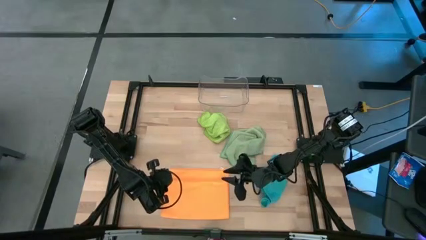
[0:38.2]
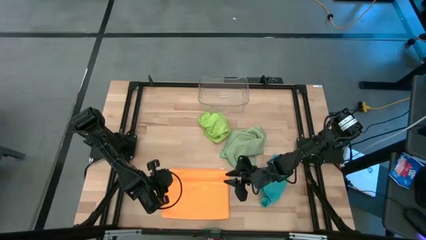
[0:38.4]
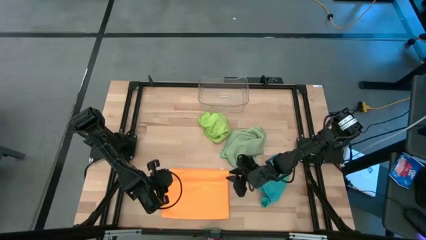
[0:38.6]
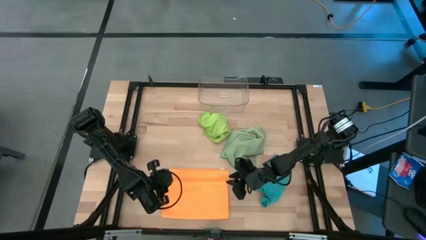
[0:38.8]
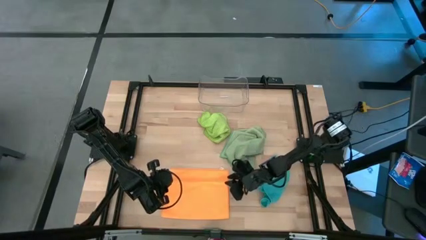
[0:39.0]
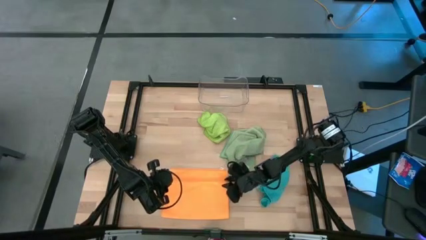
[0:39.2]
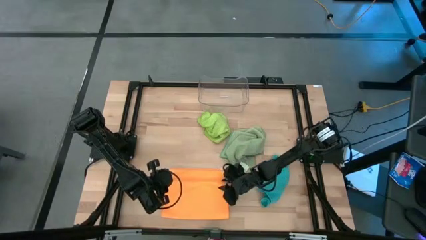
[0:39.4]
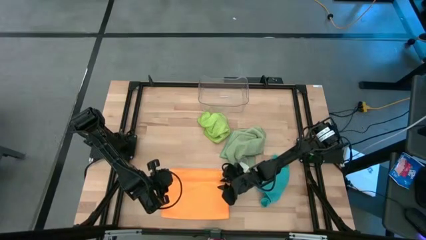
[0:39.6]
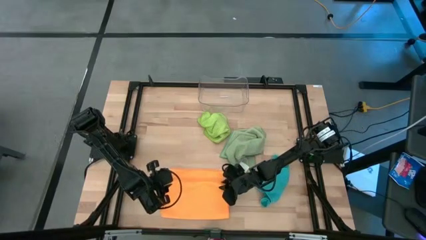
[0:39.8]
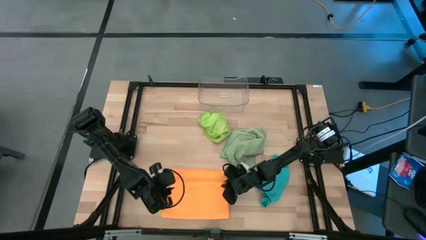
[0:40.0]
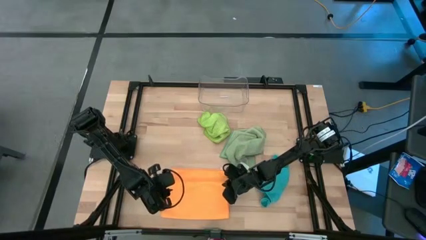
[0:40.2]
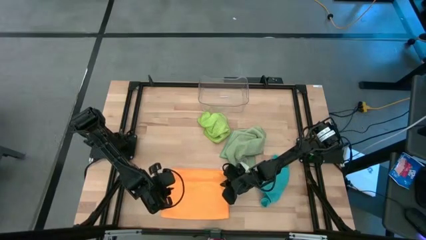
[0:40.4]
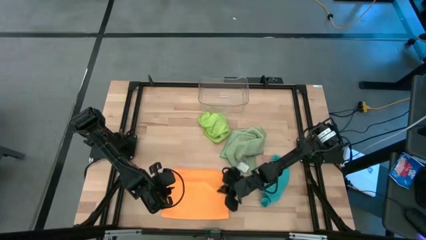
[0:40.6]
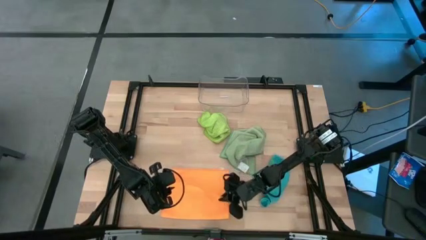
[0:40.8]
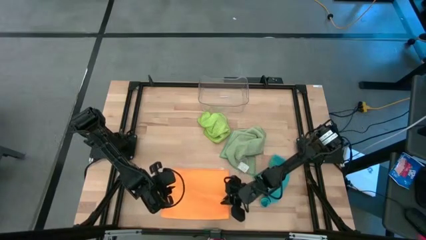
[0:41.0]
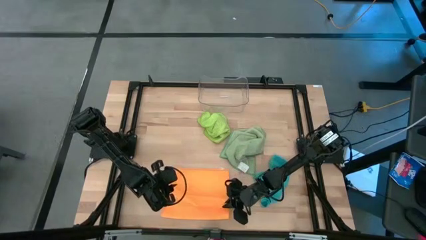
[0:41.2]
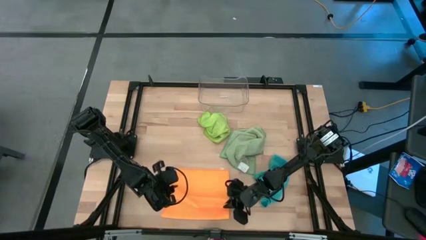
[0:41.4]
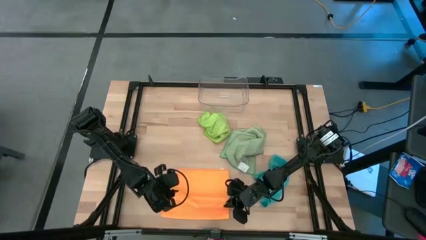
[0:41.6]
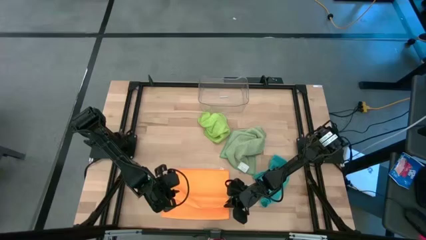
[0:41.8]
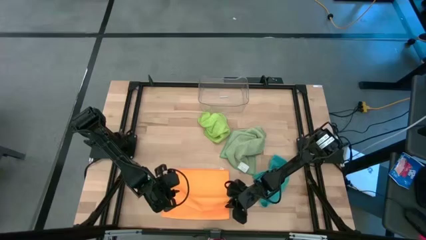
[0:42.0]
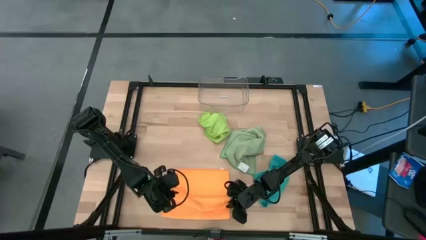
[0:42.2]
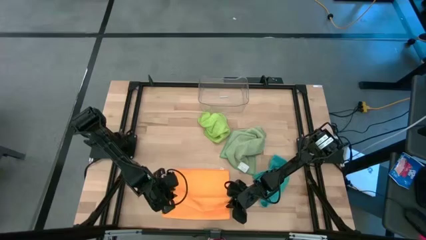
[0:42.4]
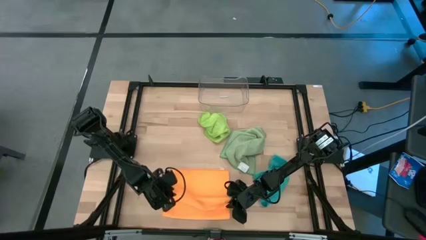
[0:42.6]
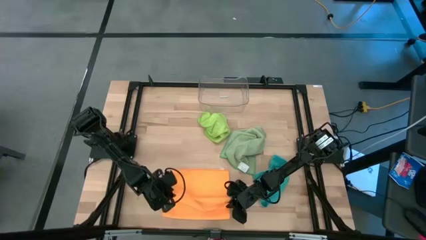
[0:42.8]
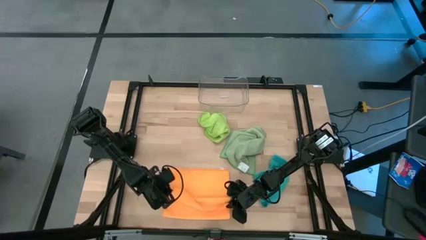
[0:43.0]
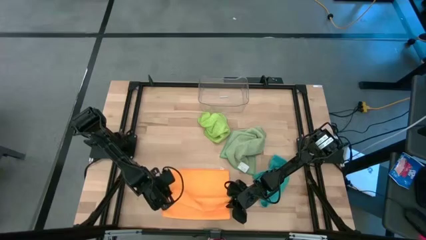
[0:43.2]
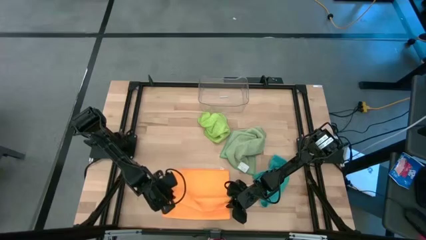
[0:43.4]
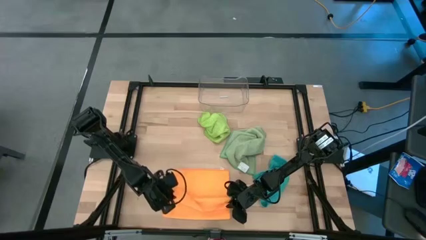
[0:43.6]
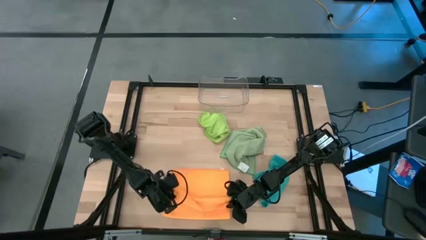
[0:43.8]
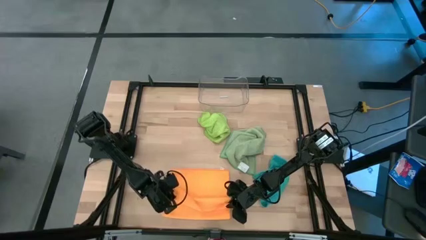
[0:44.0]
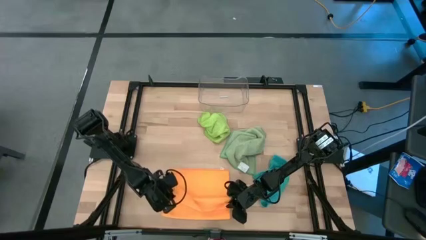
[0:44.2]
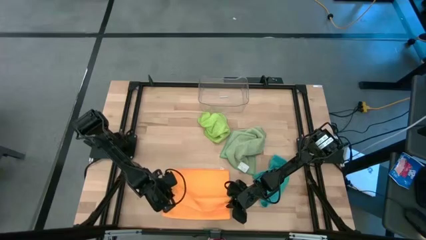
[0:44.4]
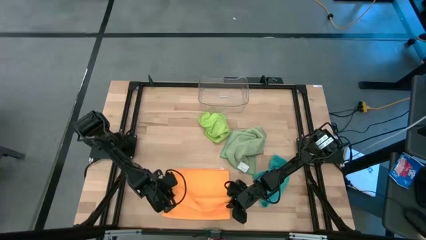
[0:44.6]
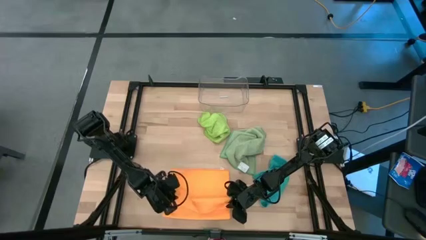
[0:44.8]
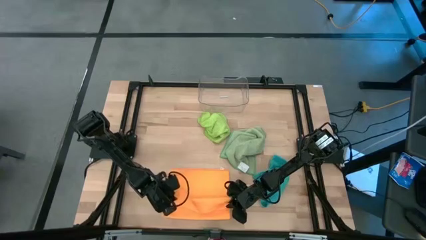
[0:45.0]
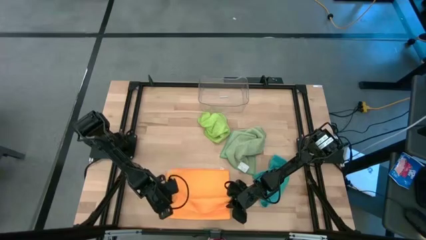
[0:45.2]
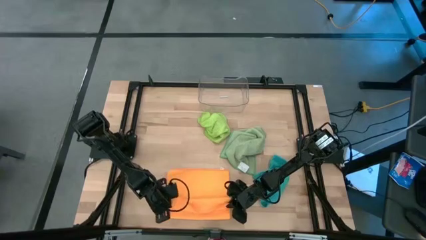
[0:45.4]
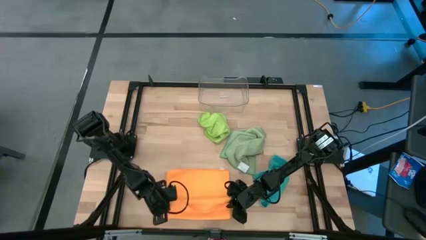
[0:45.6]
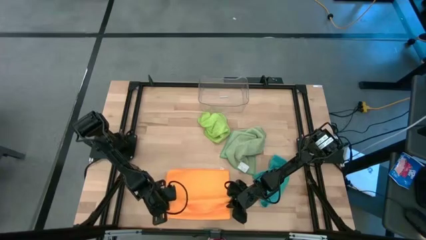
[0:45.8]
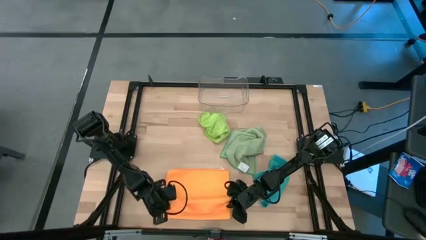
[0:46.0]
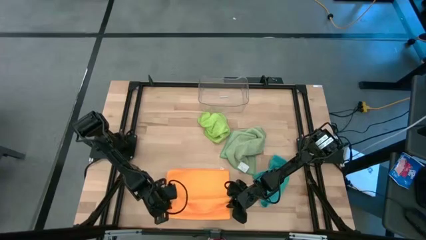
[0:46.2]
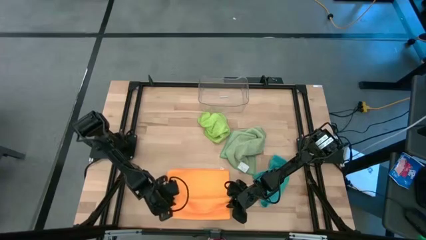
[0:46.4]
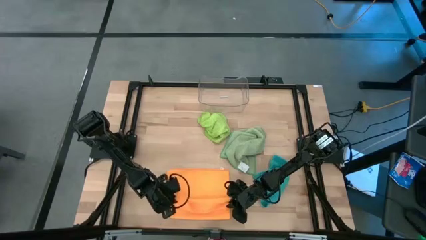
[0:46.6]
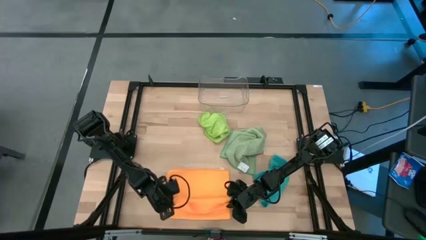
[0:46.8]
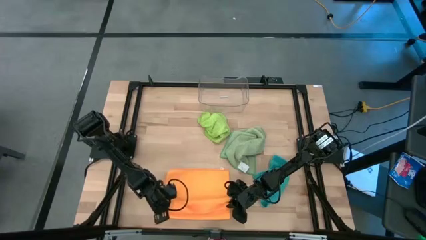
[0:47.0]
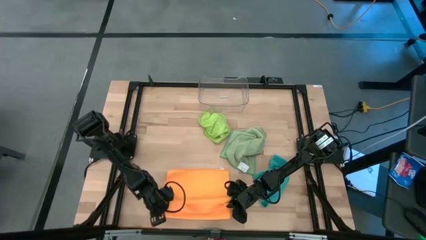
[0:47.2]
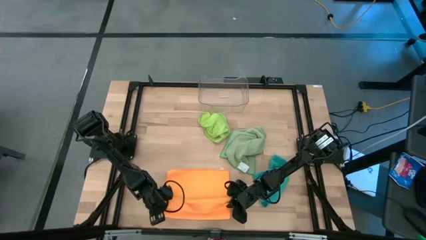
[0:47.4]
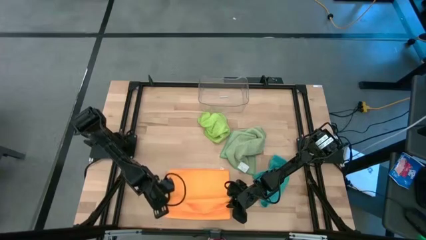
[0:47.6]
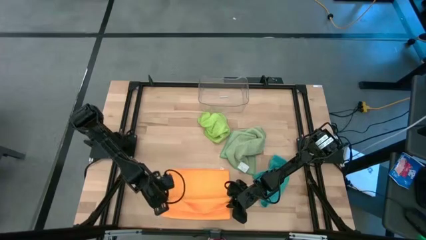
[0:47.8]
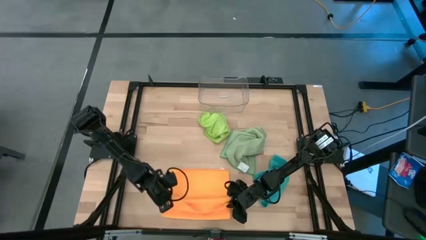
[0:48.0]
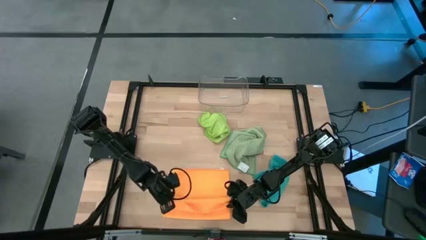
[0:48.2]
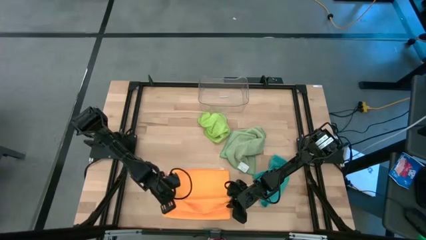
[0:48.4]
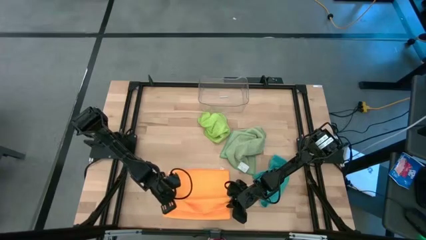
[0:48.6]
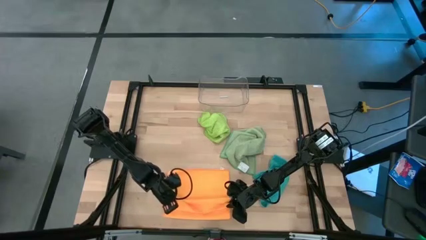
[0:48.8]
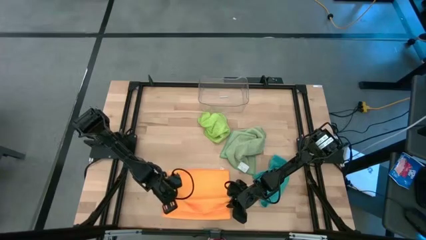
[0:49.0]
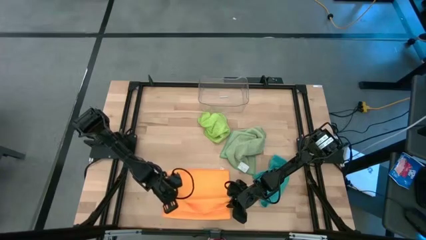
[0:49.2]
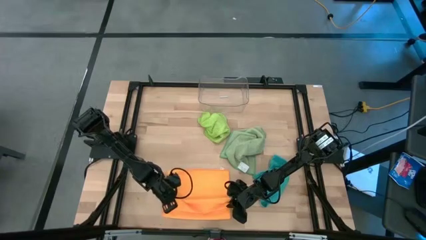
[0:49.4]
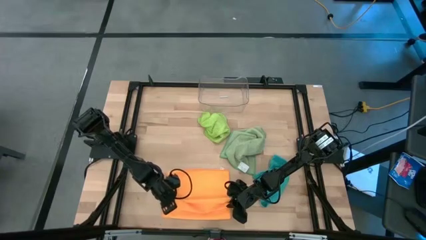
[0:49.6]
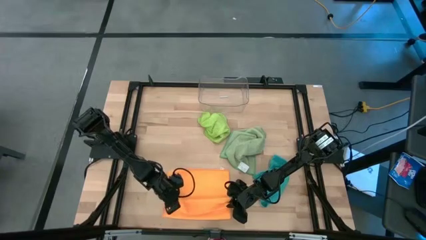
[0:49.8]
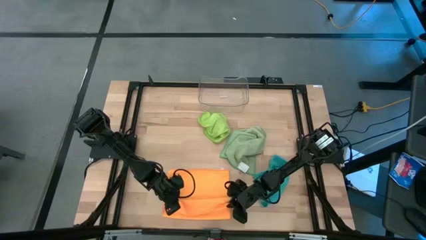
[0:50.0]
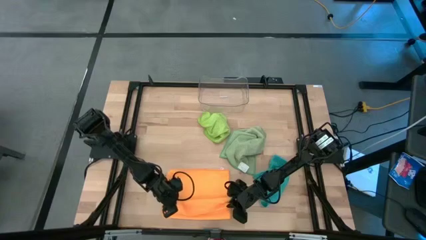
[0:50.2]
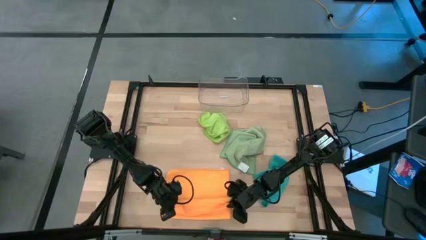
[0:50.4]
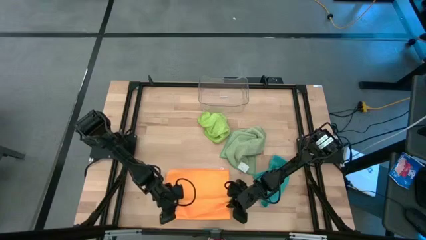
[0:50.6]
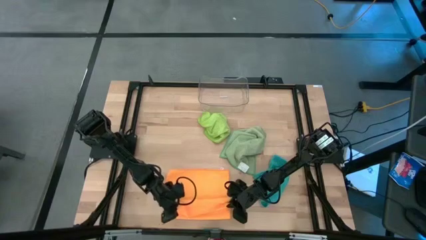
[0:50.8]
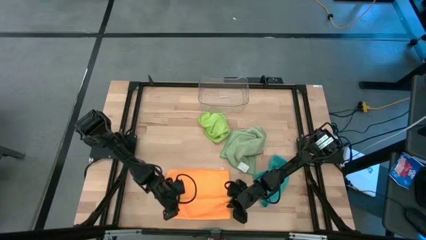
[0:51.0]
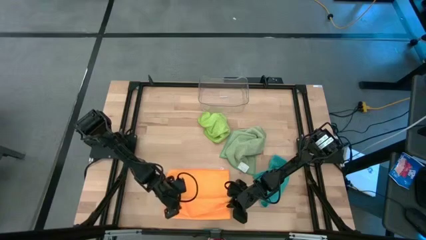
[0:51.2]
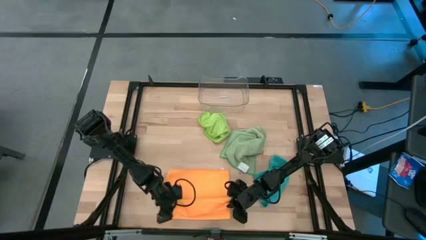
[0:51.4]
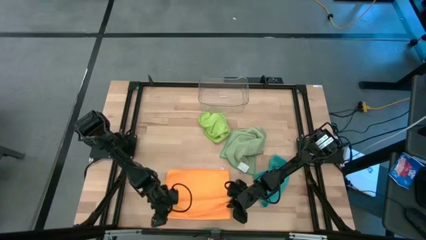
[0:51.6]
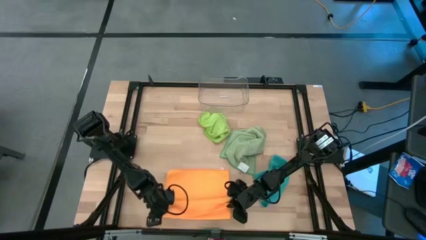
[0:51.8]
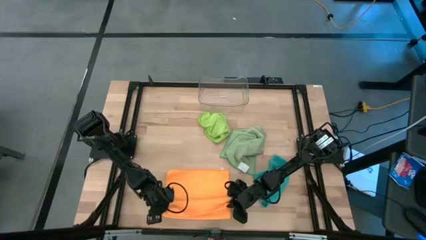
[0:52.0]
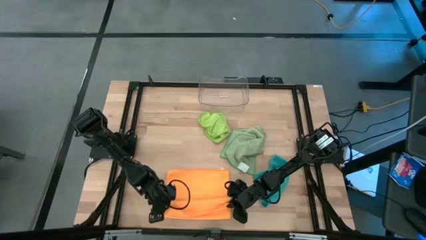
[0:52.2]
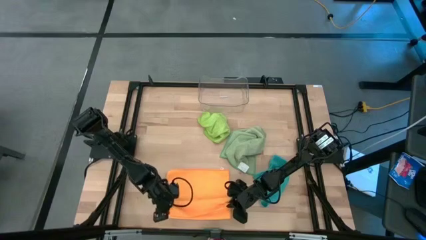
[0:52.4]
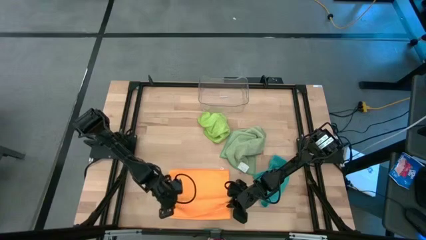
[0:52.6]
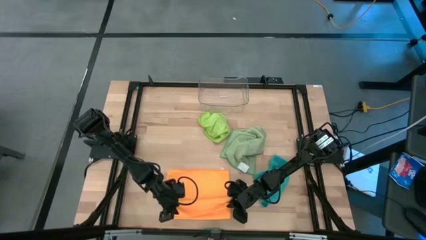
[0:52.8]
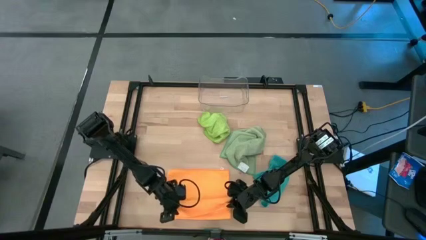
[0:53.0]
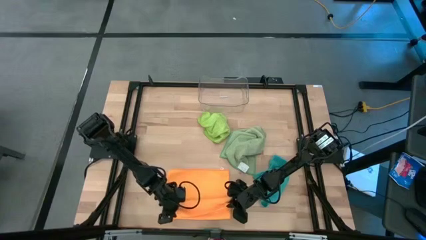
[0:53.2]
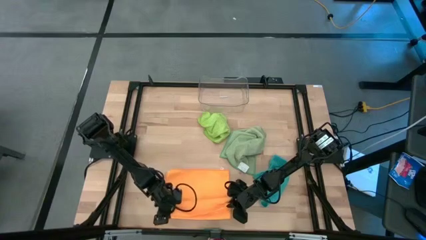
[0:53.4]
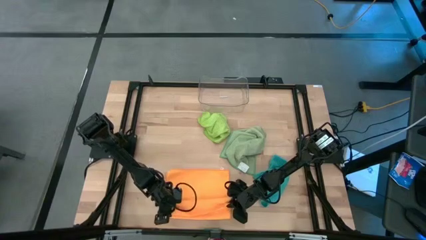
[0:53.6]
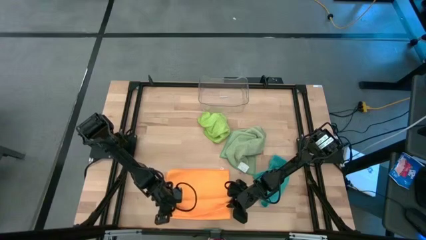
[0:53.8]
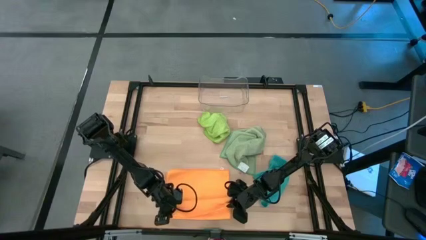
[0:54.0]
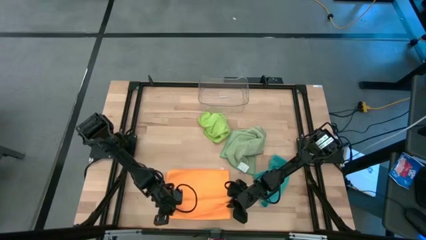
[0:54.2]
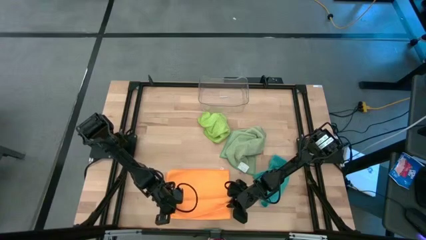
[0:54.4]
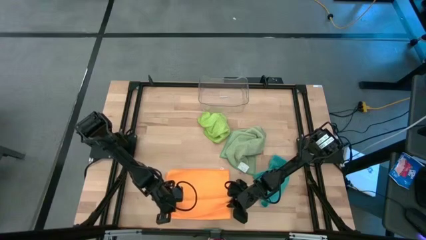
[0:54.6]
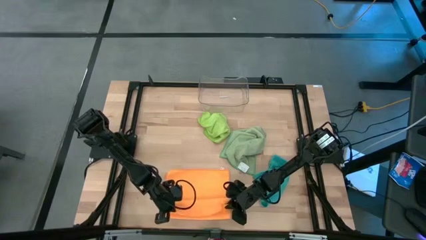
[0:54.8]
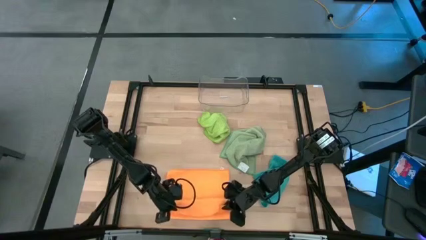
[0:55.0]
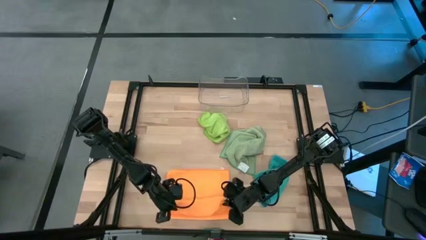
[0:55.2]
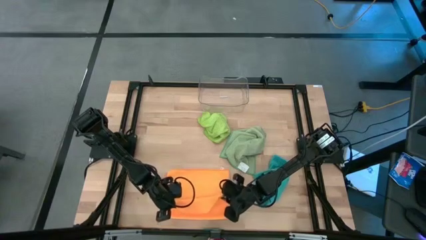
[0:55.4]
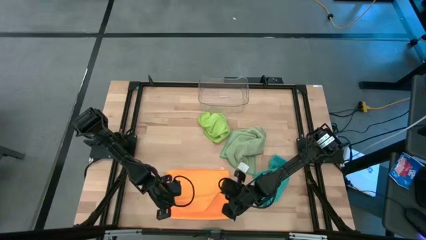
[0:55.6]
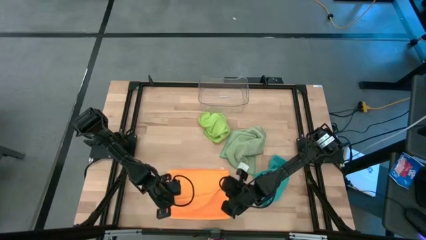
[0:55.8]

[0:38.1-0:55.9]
Task: Fold microfiber towels
Fold the orange microfiber towel
